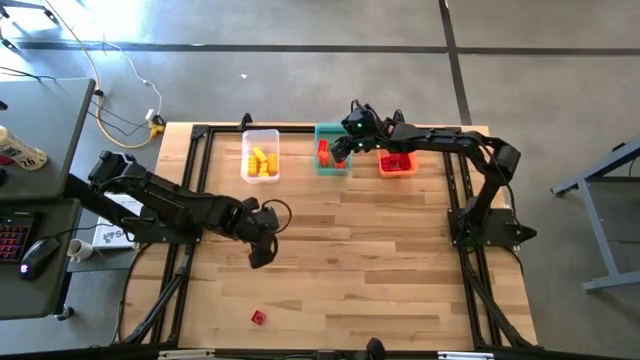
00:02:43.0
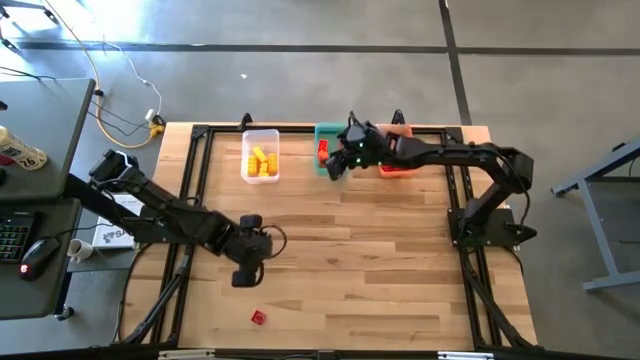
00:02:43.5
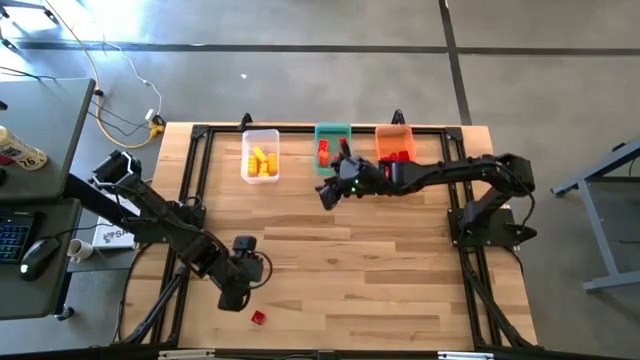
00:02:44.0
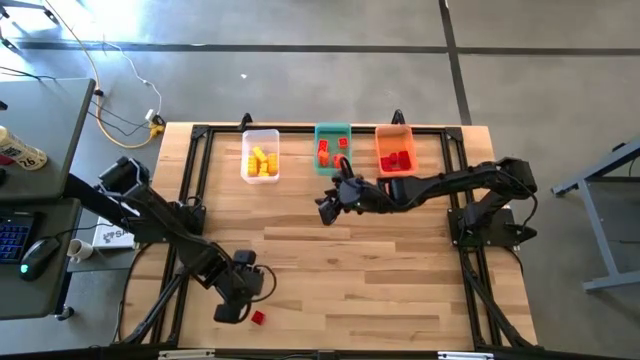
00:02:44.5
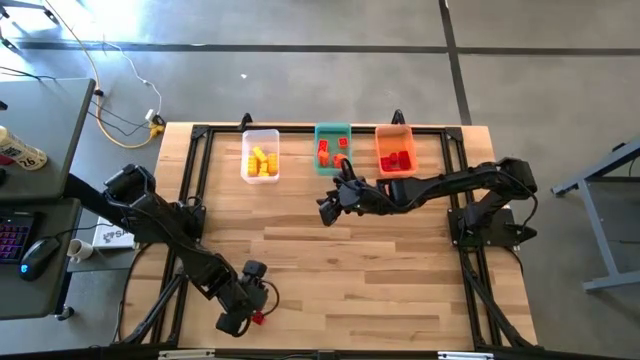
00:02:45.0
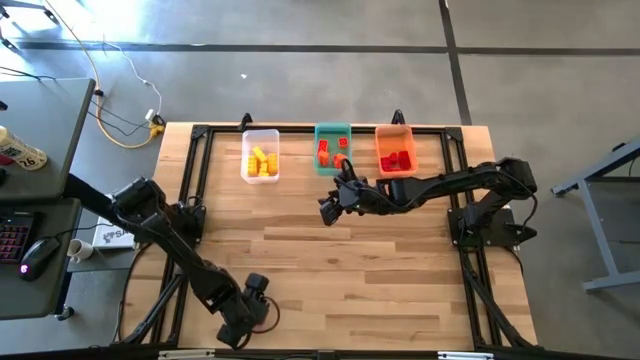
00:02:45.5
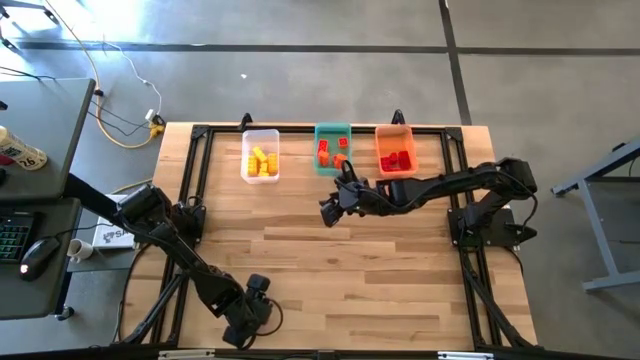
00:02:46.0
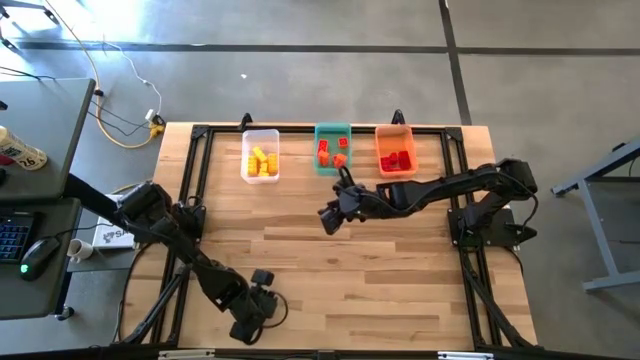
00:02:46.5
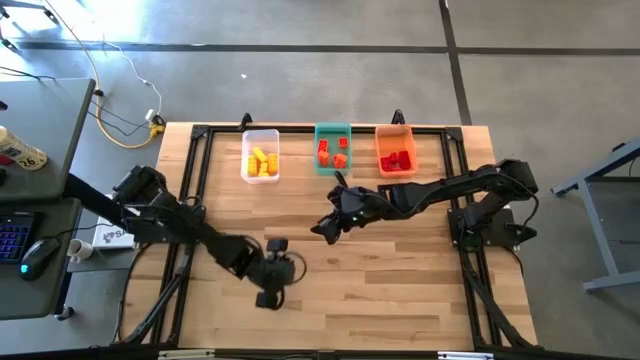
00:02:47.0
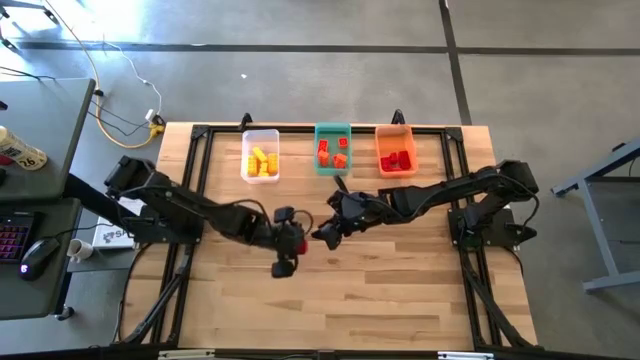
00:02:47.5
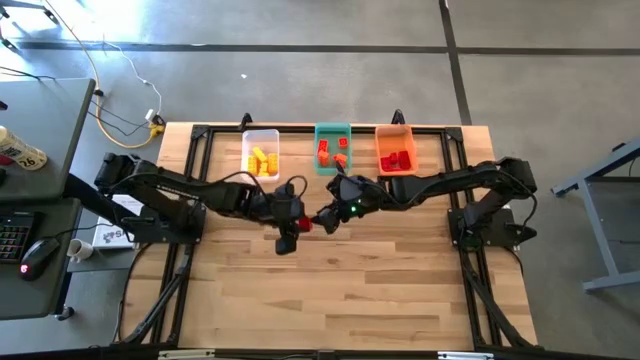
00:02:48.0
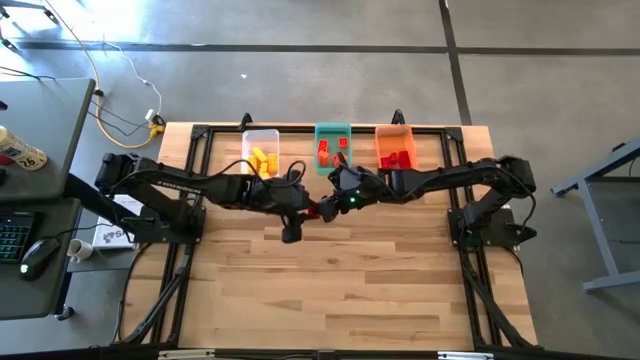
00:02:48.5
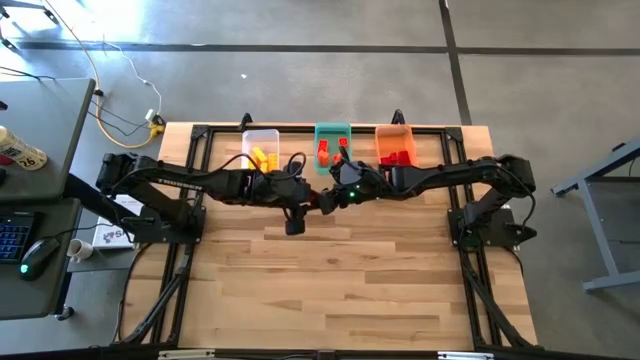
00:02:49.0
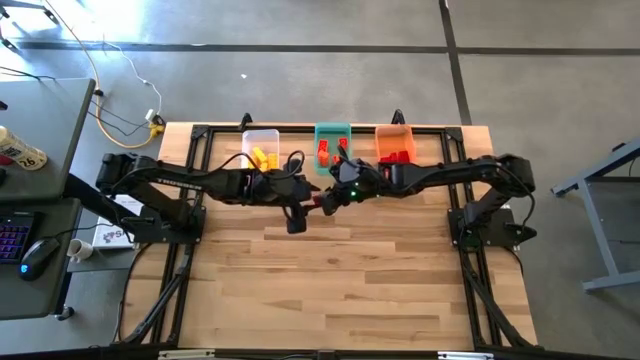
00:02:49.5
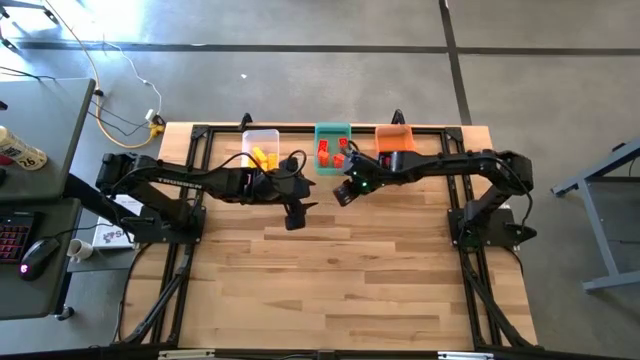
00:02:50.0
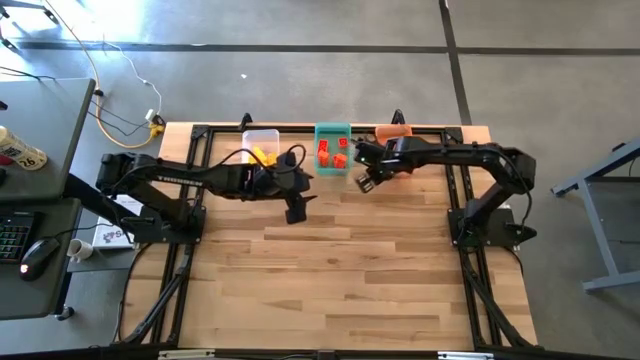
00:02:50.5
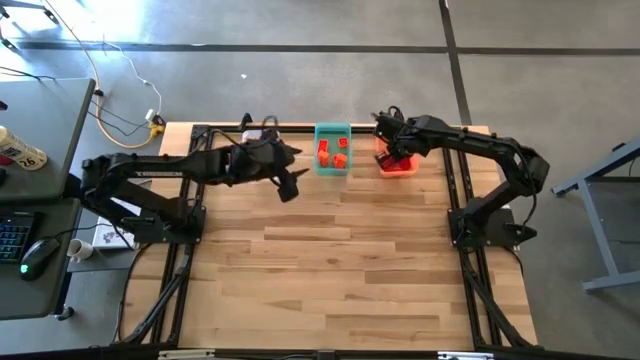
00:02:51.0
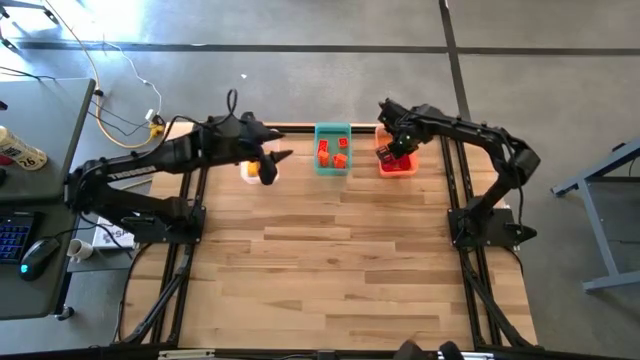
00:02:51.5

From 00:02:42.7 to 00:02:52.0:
Task: Sort & place blocks by color
Put the red game piece into the orange bin

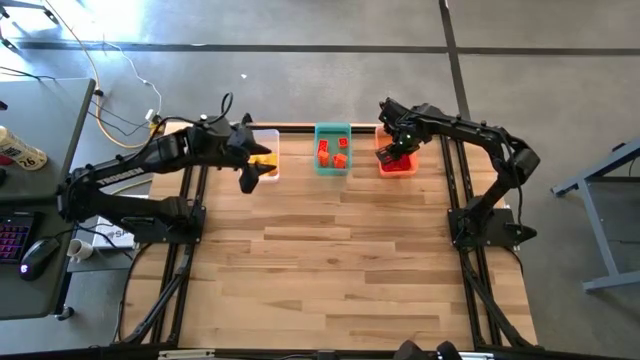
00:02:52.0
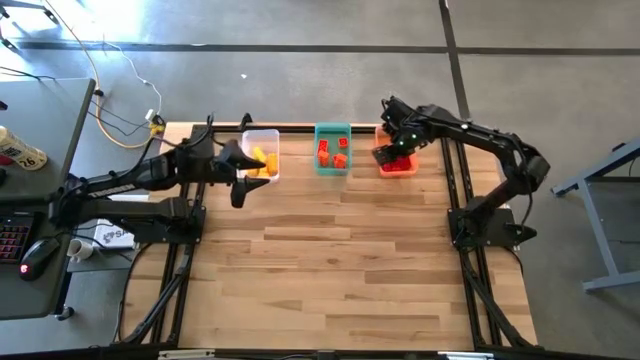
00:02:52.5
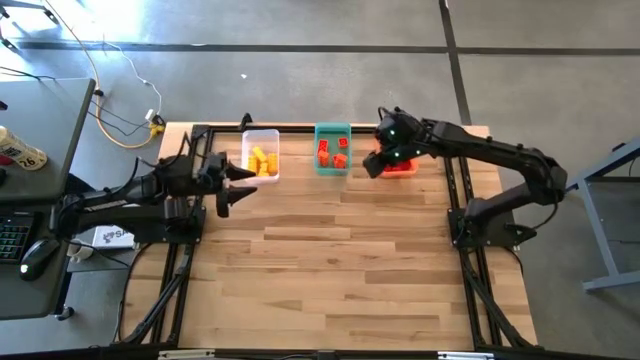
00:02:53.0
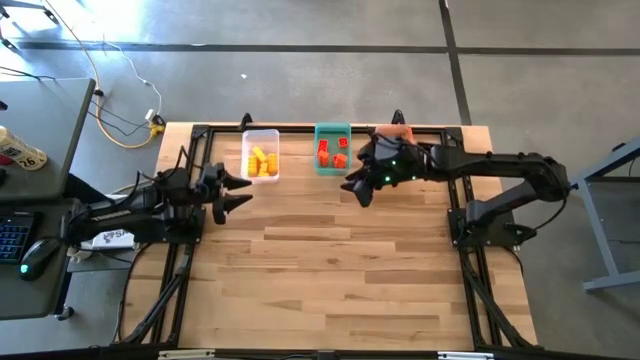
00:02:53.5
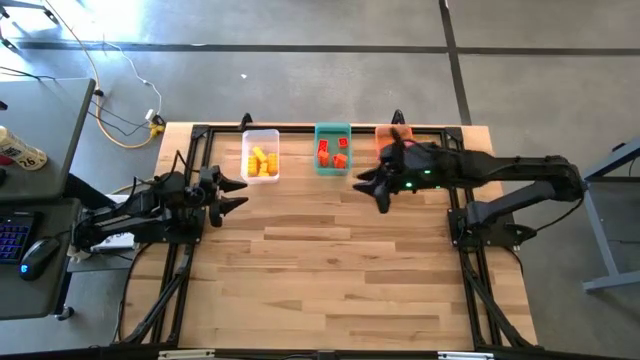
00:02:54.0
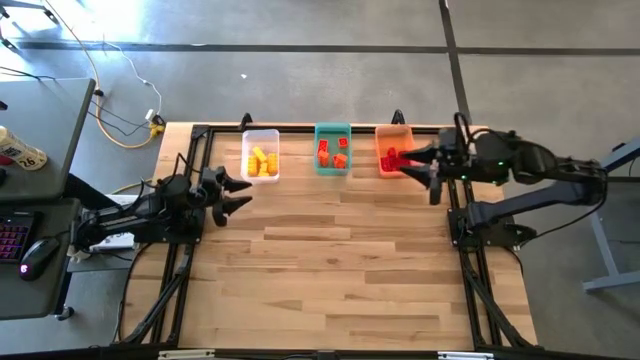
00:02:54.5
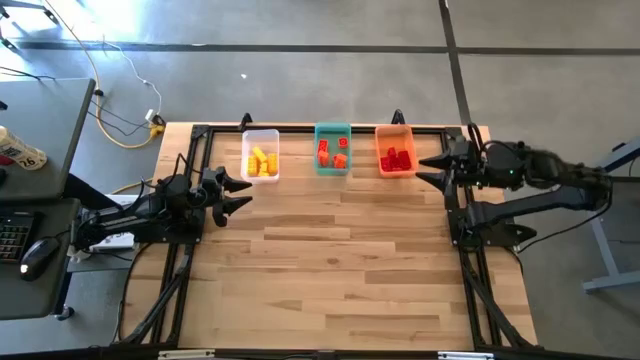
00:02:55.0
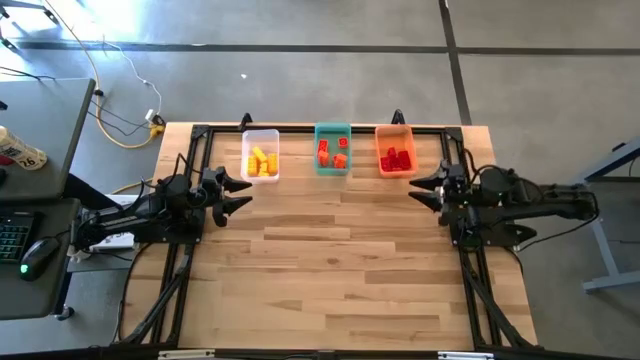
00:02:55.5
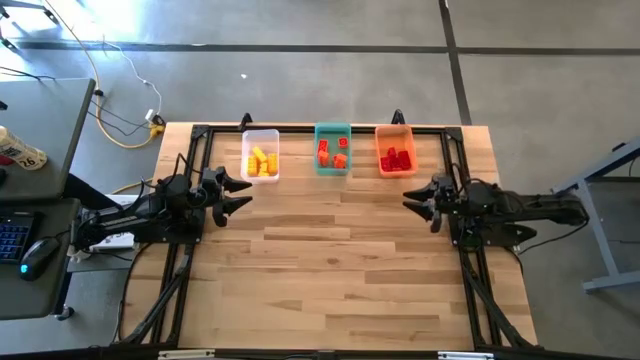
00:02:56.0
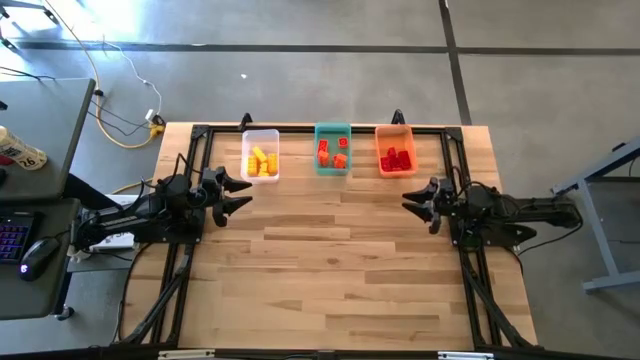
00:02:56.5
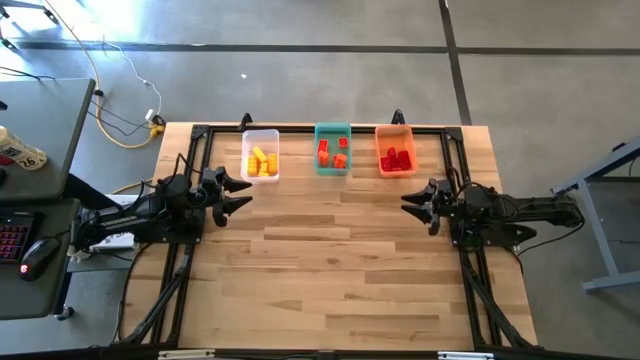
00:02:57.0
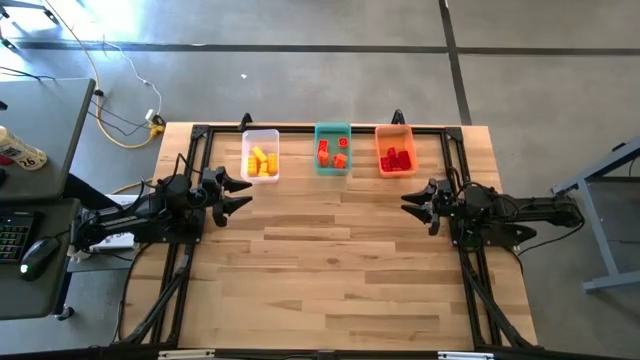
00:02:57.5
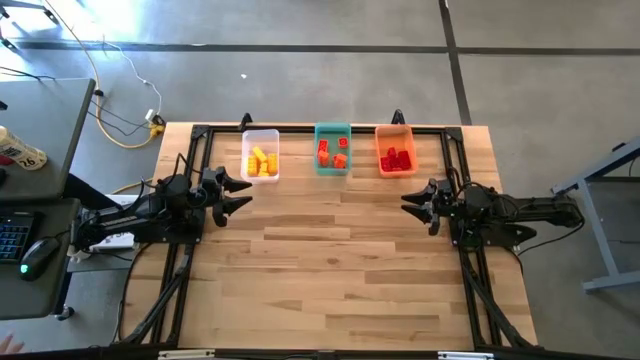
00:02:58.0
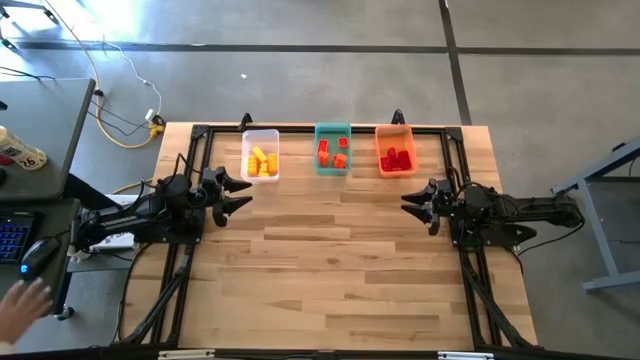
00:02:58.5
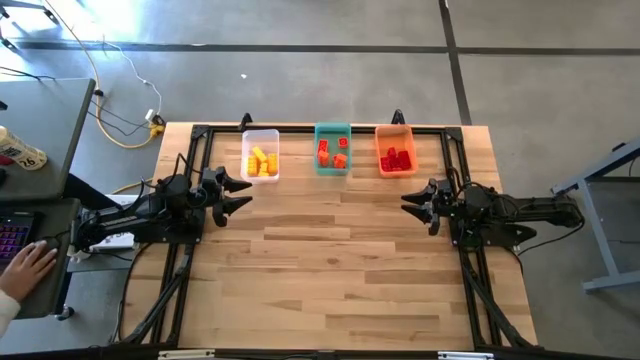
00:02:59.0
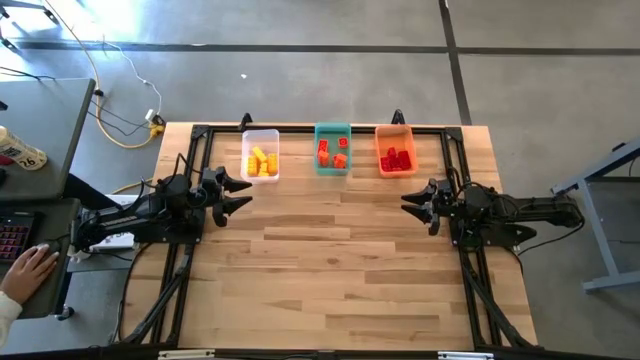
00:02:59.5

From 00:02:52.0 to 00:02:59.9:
Return to Home Position

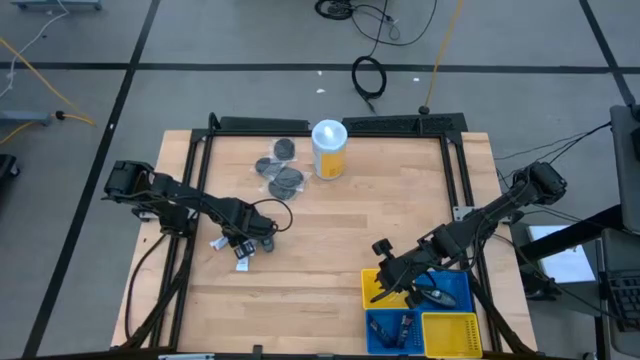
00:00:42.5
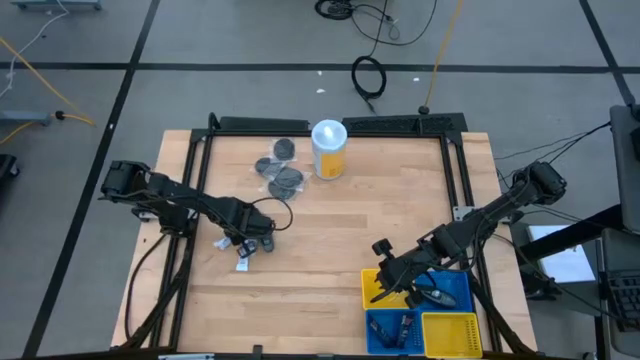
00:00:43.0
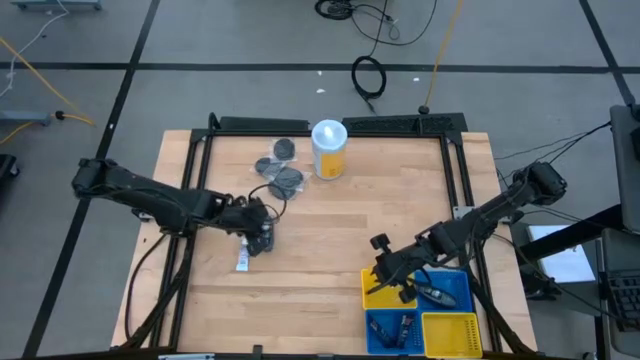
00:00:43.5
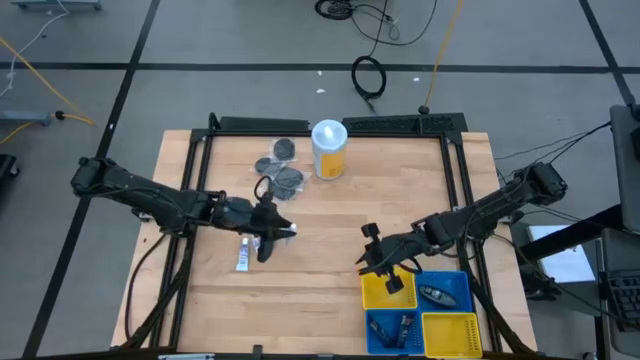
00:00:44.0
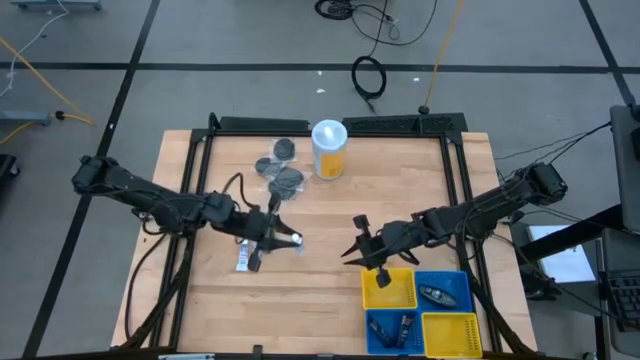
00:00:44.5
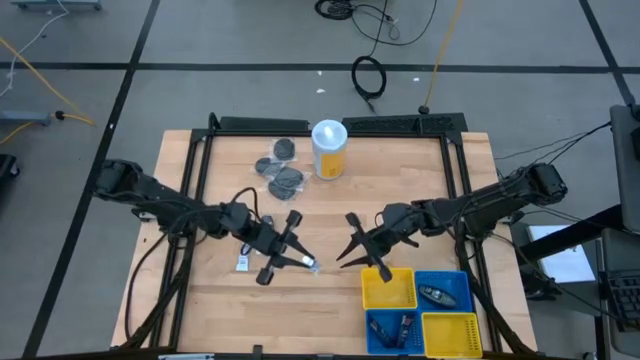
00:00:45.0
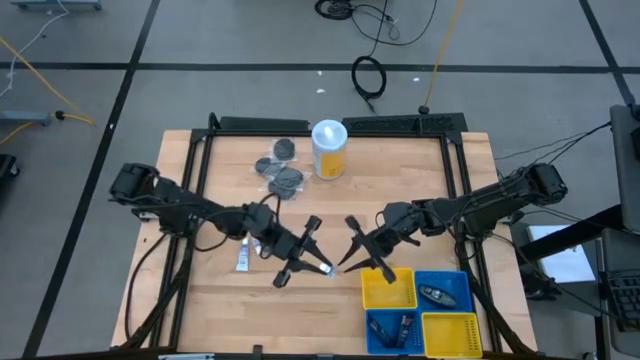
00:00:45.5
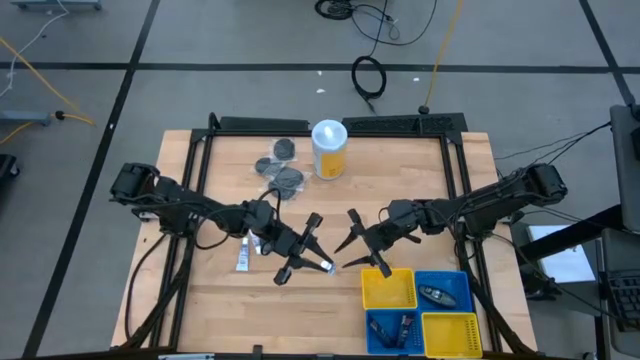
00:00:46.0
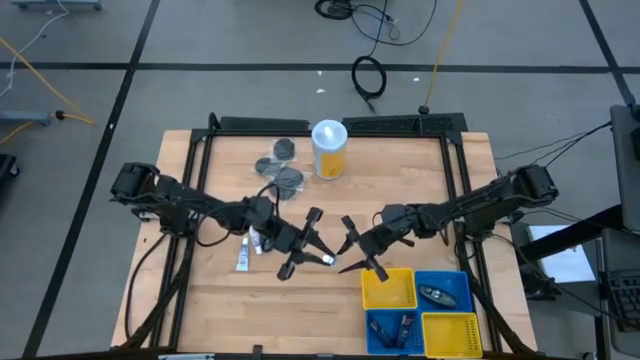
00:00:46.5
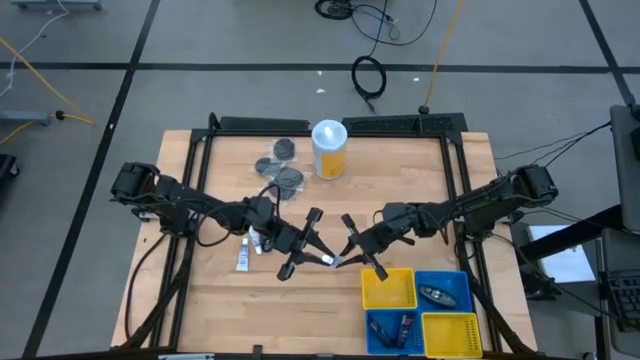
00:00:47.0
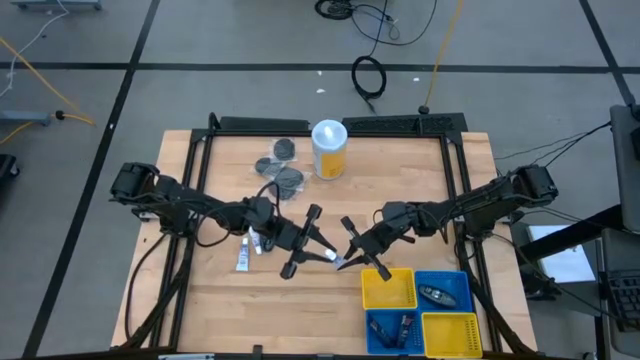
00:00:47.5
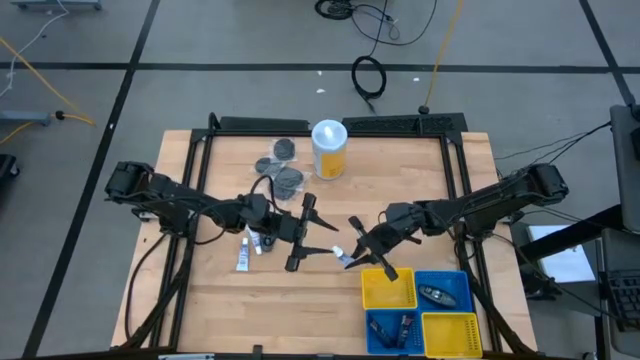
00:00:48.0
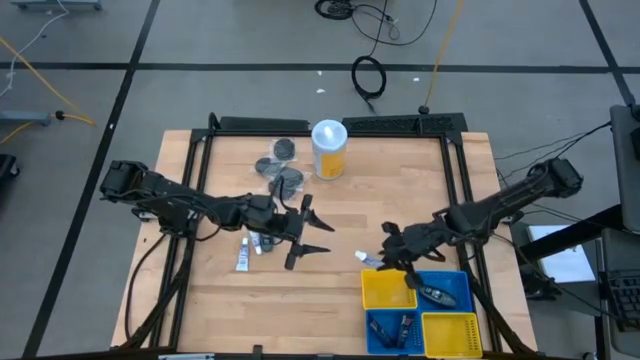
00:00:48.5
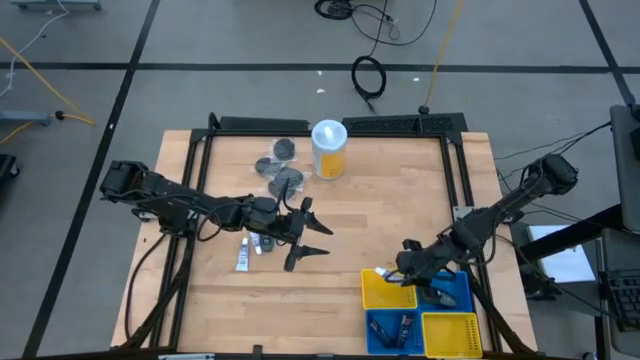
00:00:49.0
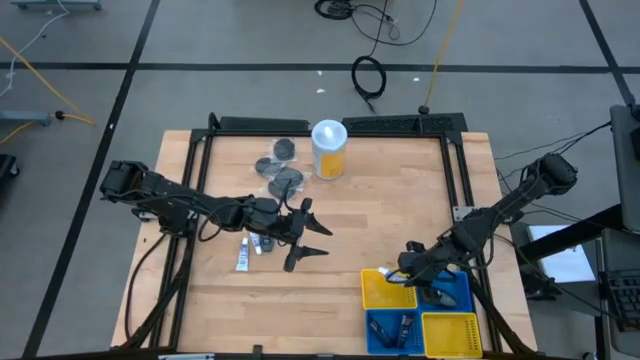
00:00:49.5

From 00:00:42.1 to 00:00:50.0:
Task: Pick & Place Travel size toiletries
Put the left toothpaste into the top yellow basket
